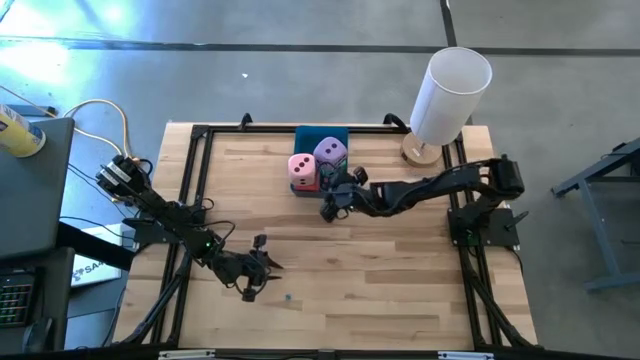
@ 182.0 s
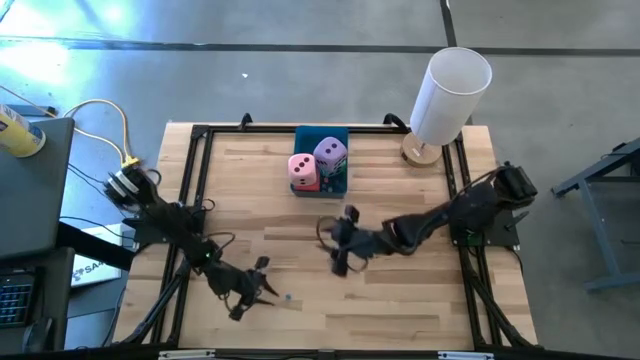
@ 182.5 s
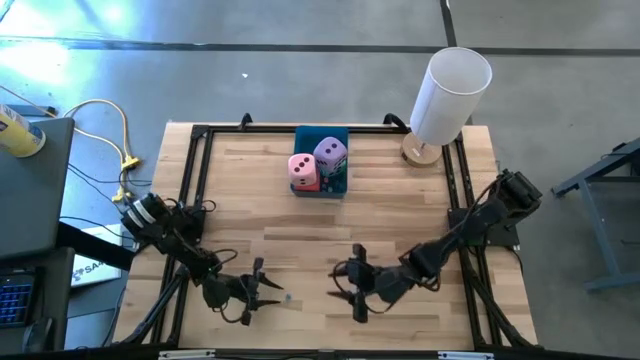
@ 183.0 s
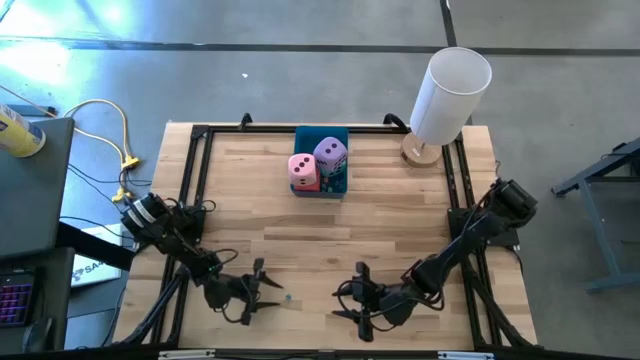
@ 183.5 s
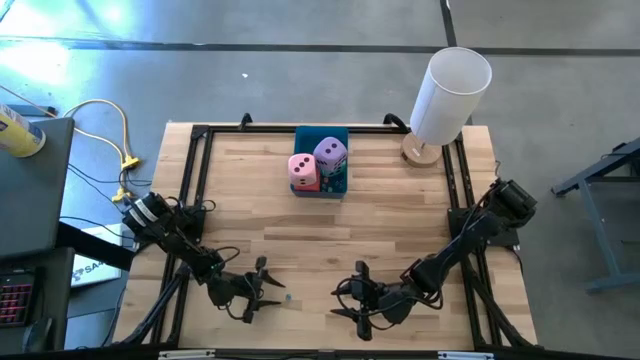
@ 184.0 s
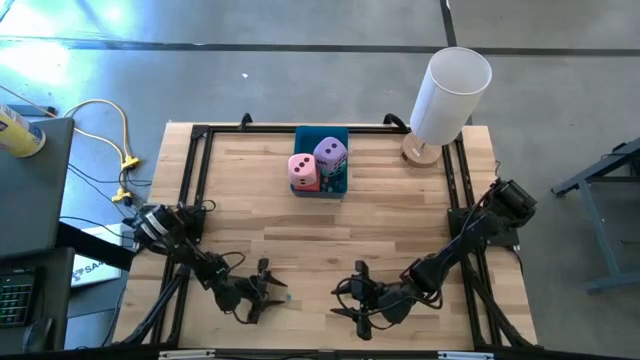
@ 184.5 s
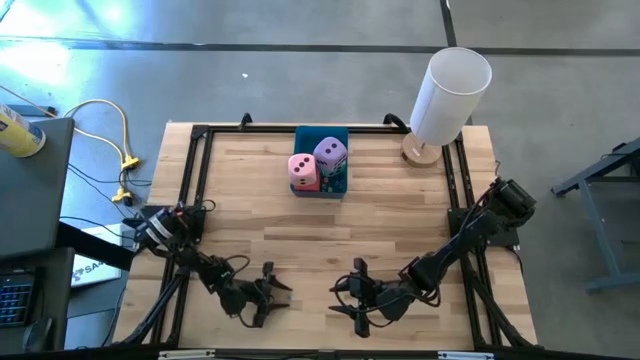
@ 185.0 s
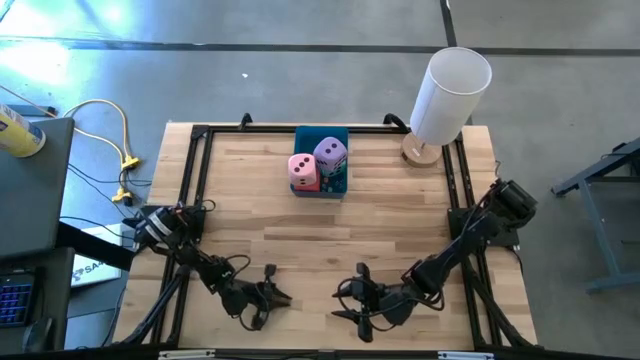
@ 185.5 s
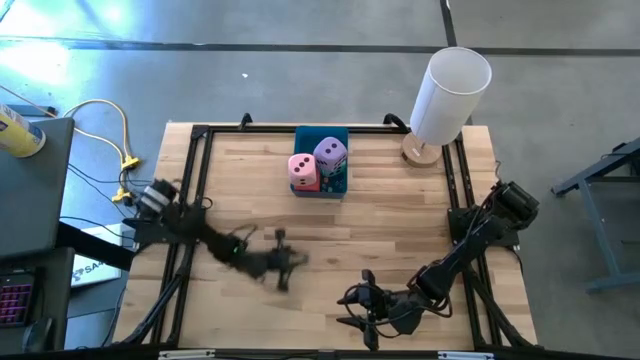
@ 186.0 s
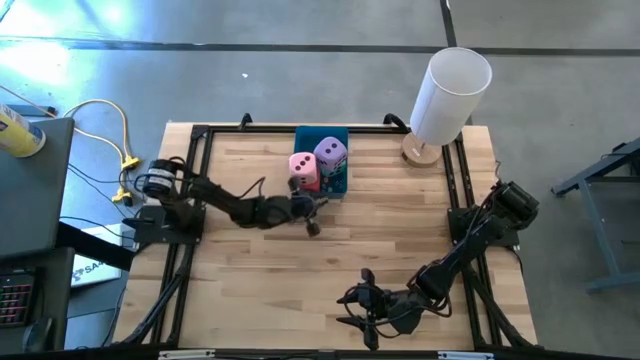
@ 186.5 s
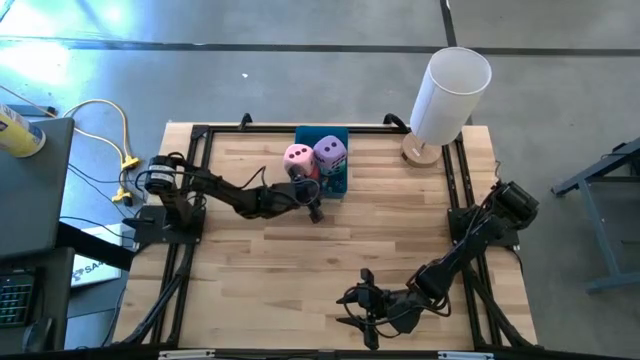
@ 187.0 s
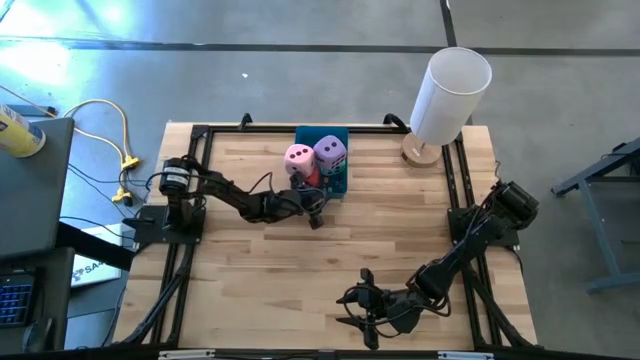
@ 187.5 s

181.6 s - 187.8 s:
Task: Pick & Place Dice
Put the small light blue die into the blue bin

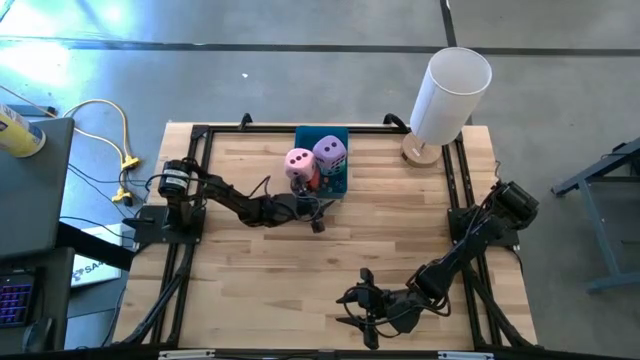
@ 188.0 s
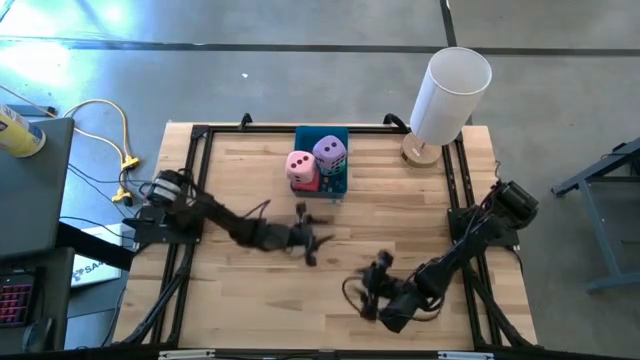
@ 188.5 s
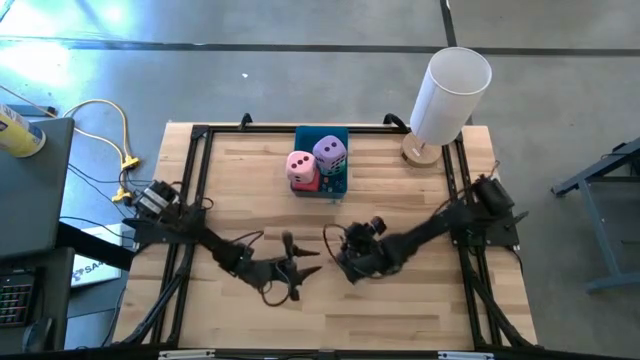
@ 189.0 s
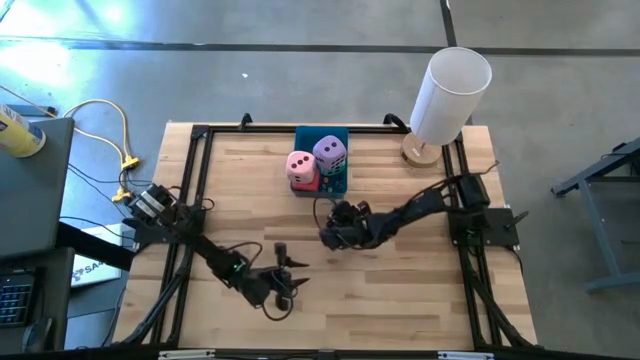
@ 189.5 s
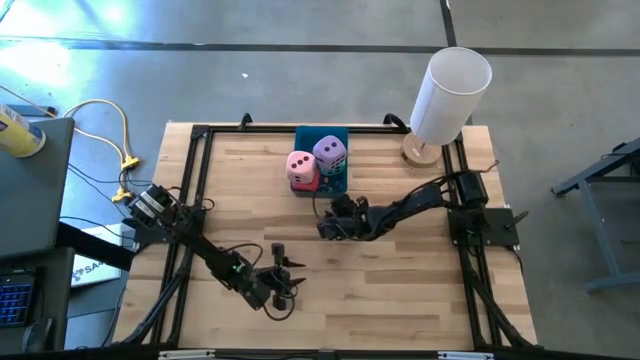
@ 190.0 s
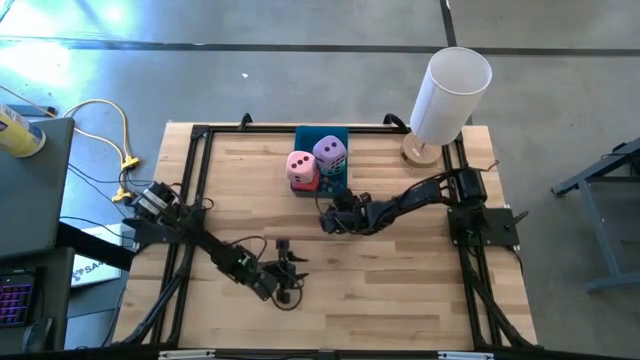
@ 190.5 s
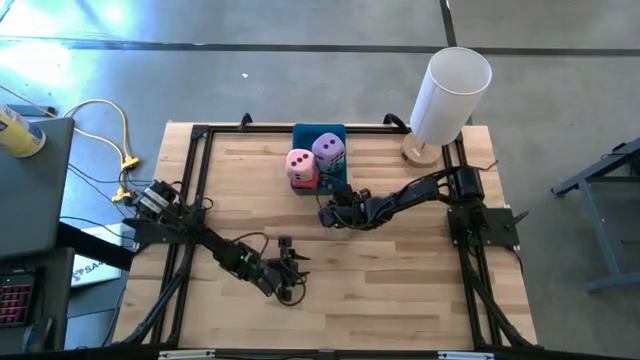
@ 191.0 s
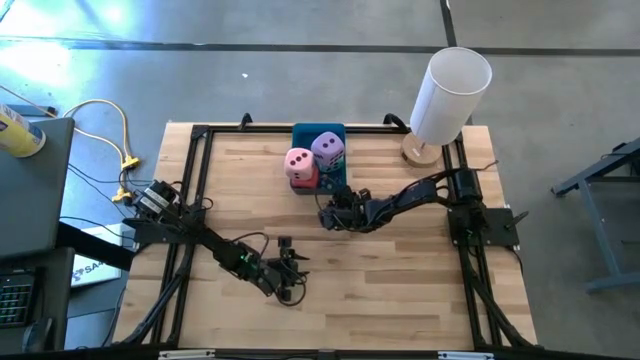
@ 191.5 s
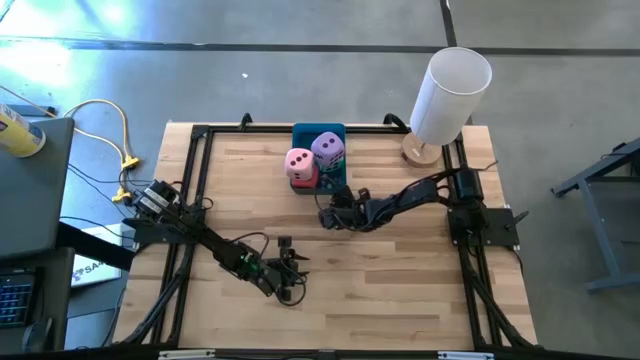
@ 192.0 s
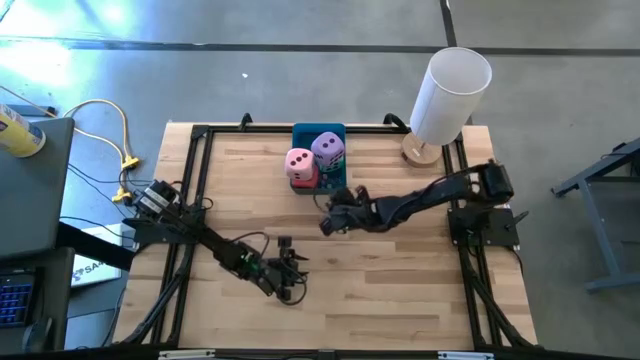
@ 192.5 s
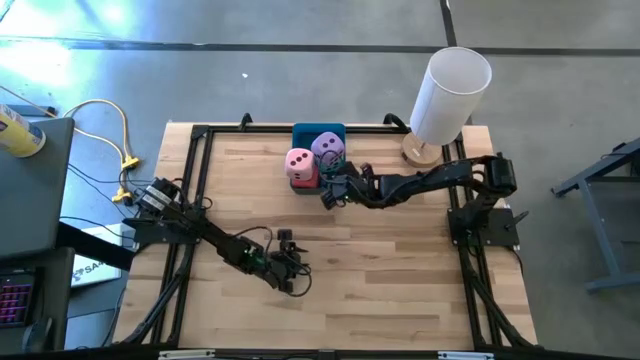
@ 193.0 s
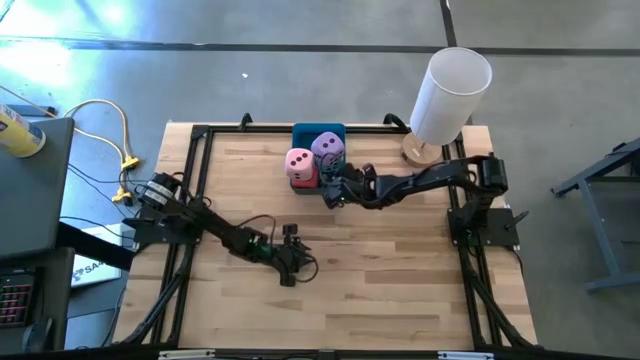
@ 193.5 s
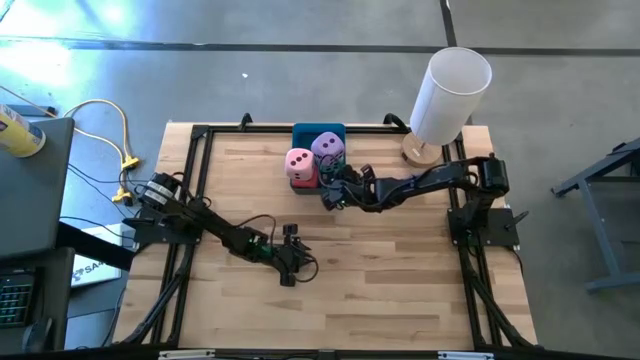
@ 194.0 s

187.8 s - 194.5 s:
Put the small light blue die into the blue bin

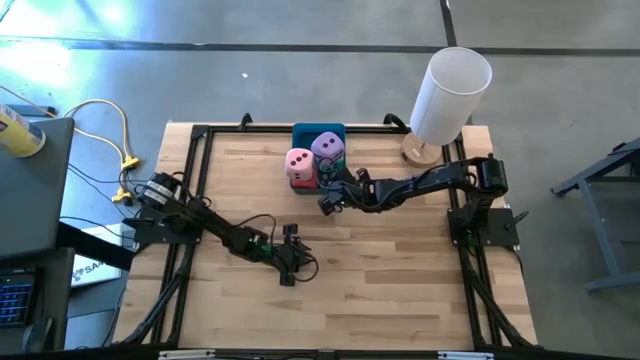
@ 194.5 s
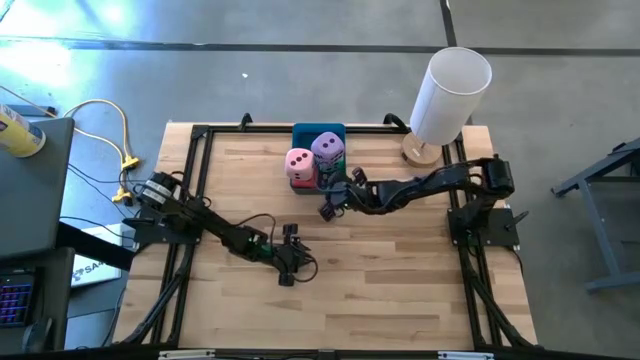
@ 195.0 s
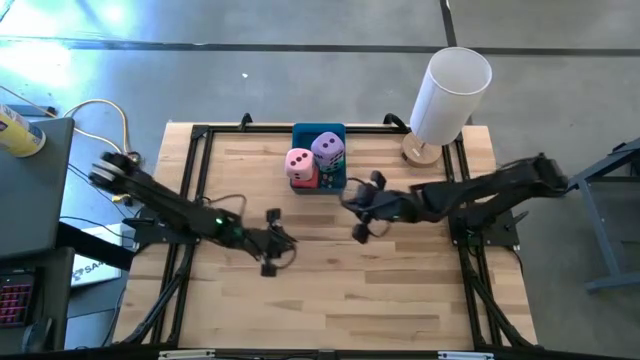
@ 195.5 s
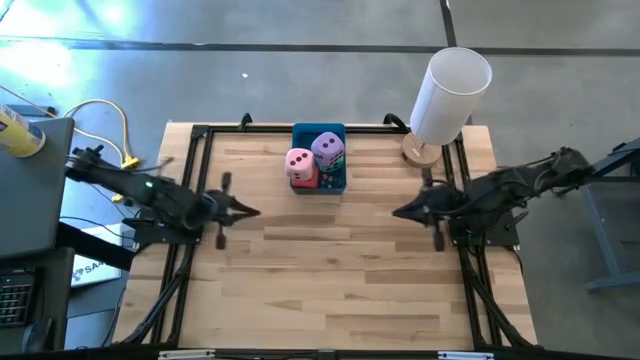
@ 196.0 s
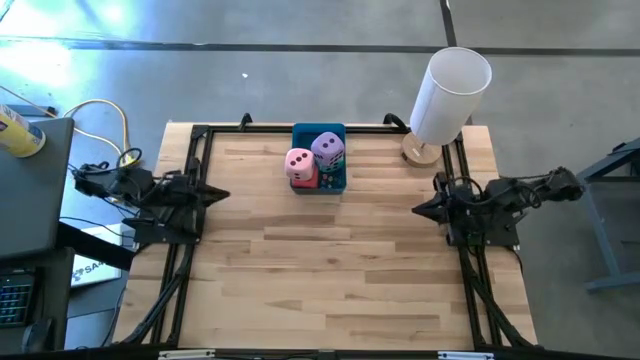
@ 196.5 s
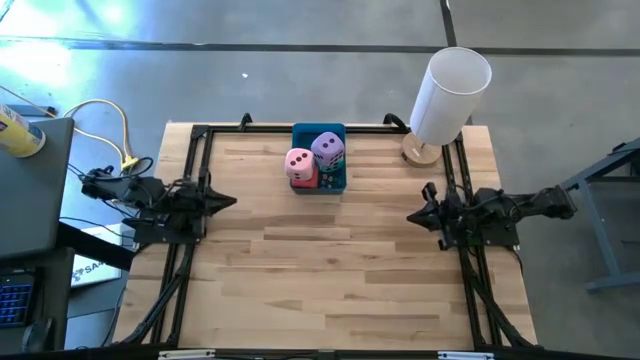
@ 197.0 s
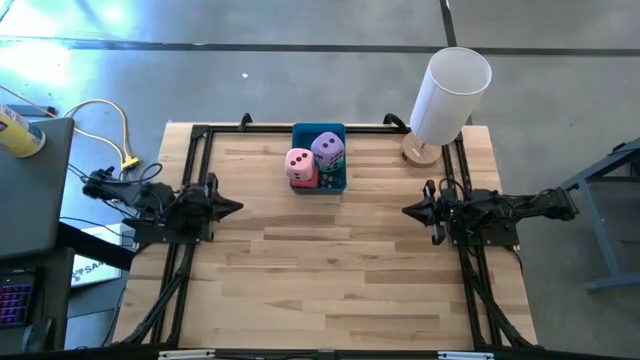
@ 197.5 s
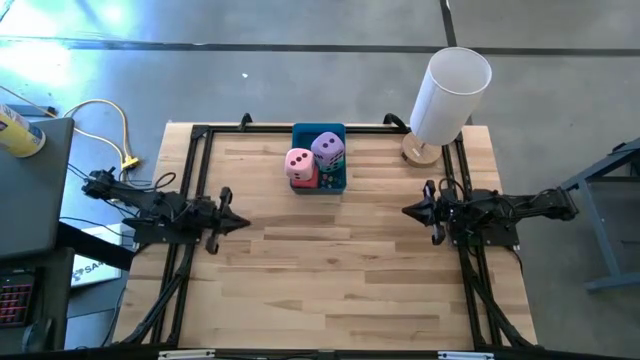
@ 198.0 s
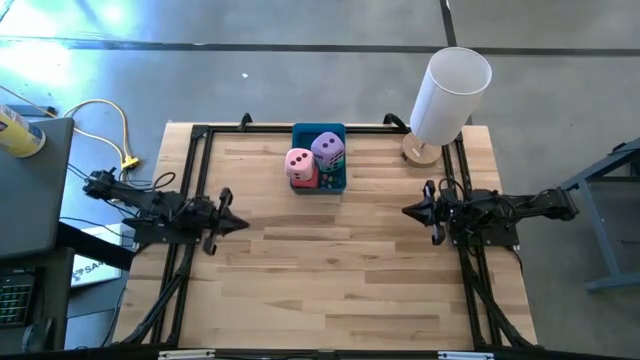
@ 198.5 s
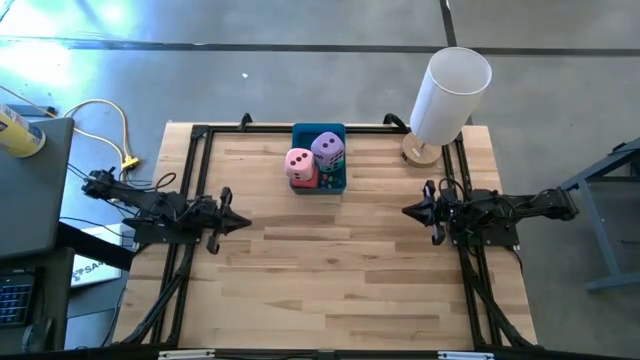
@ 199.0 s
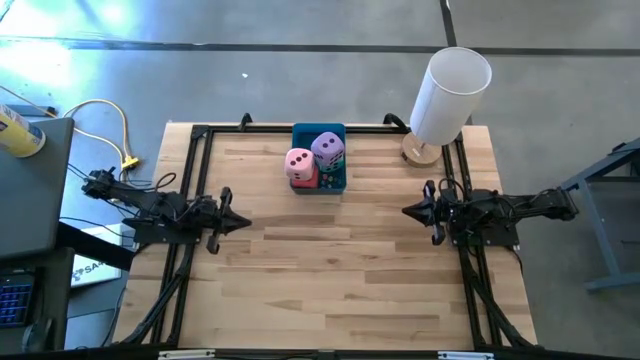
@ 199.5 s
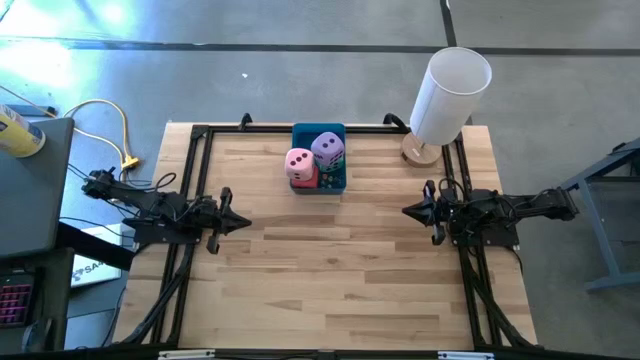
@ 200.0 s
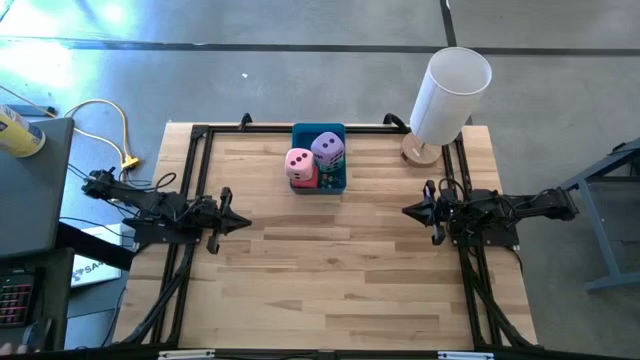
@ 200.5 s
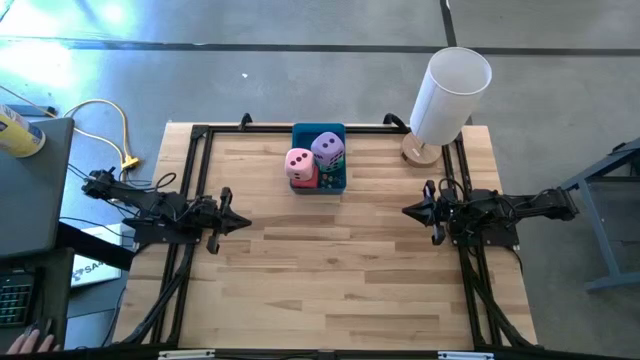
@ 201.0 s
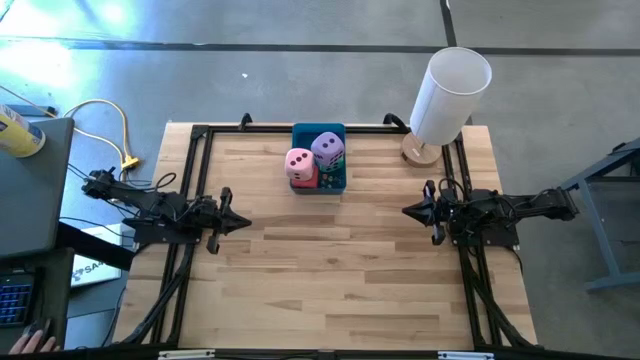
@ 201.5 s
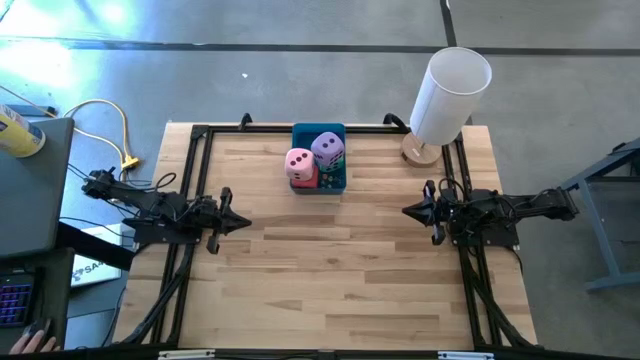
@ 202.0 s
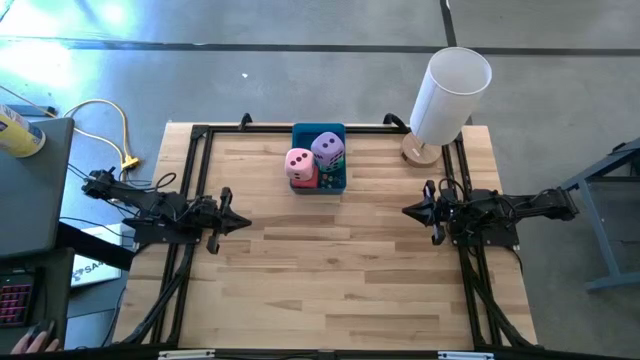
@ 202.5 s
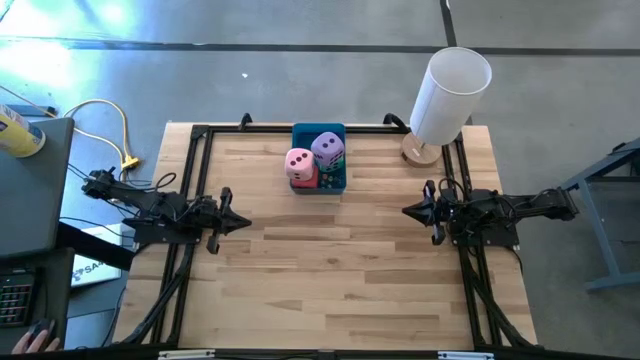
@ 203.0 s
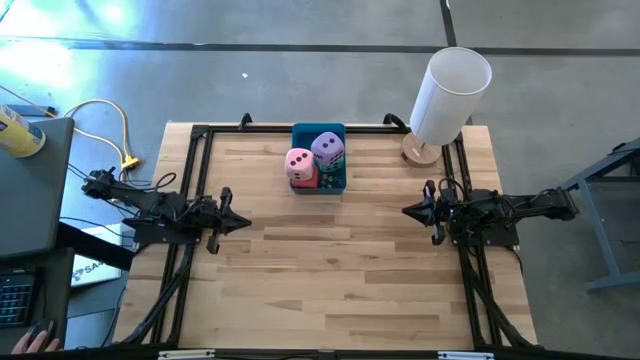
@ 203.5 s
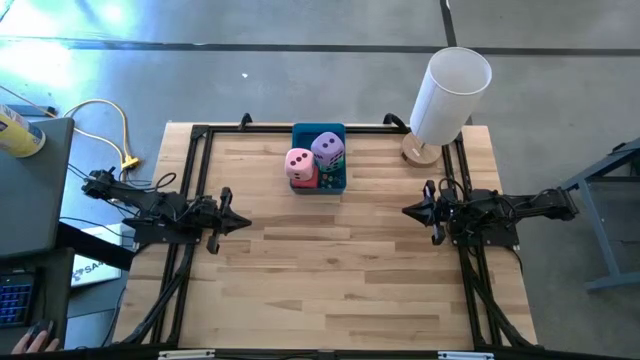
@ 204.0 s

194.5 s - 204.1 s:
Return to Home Position
